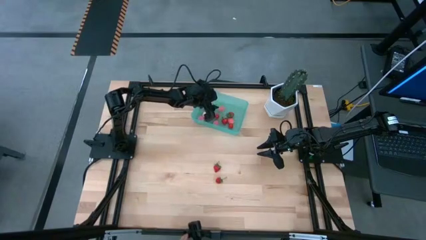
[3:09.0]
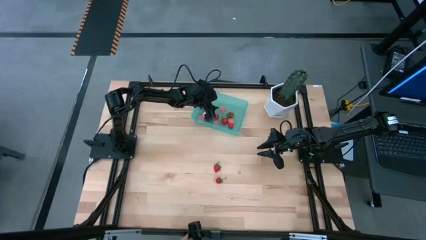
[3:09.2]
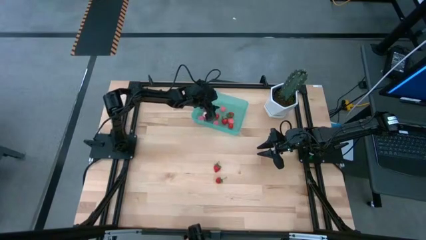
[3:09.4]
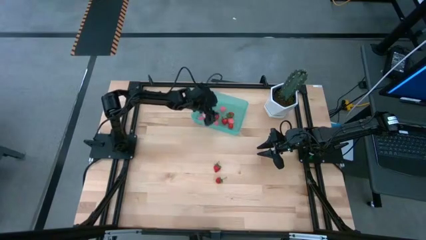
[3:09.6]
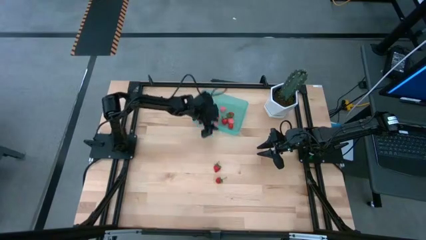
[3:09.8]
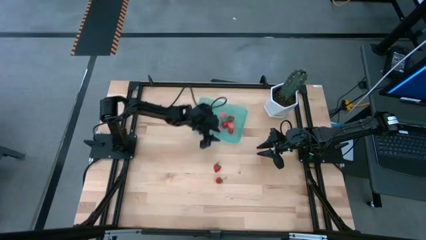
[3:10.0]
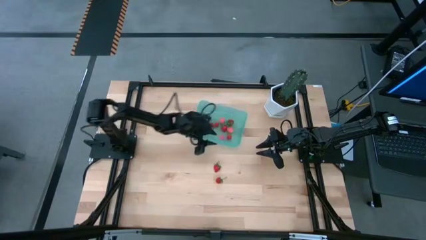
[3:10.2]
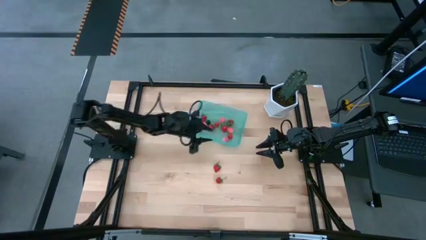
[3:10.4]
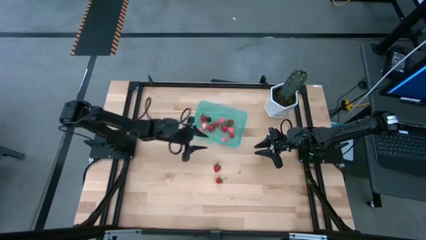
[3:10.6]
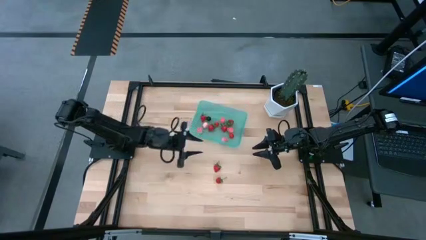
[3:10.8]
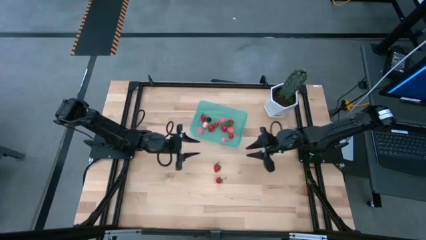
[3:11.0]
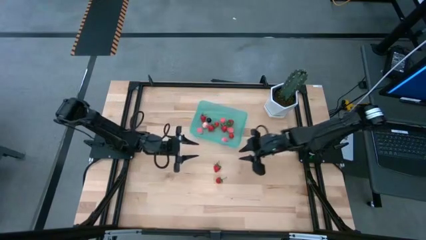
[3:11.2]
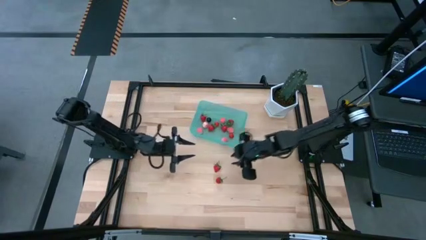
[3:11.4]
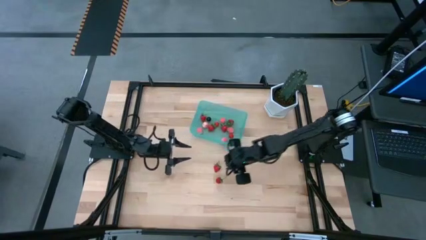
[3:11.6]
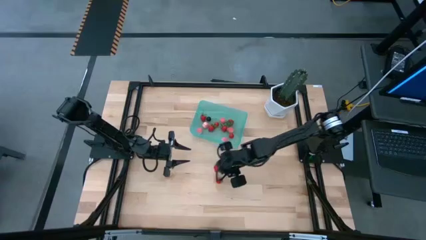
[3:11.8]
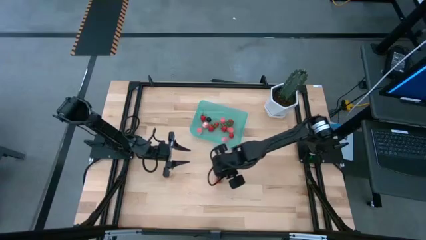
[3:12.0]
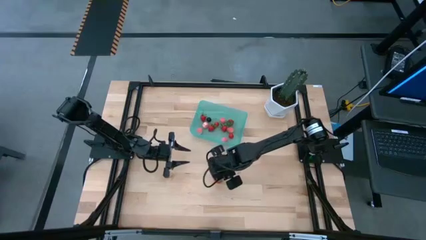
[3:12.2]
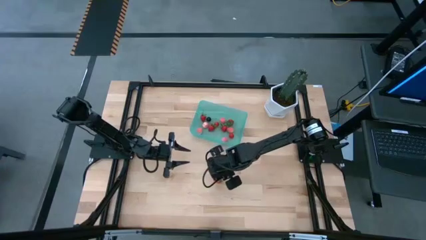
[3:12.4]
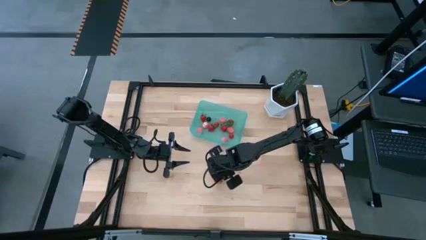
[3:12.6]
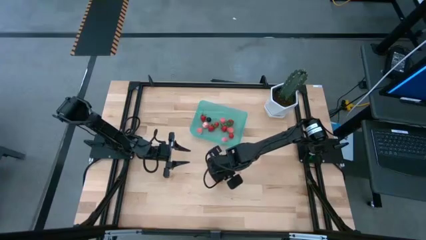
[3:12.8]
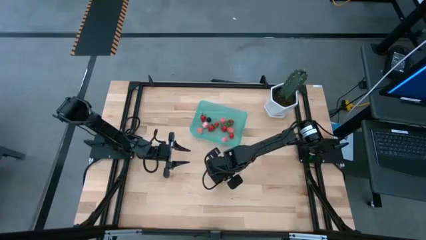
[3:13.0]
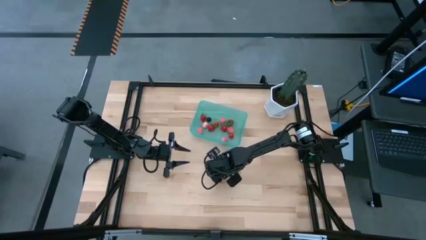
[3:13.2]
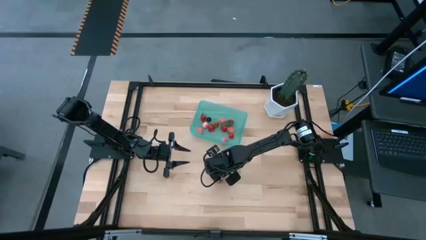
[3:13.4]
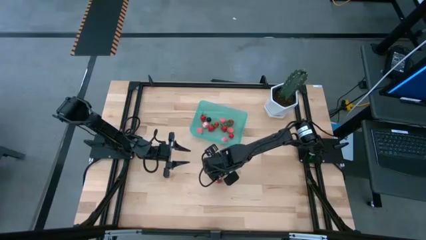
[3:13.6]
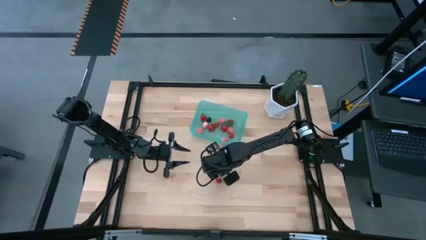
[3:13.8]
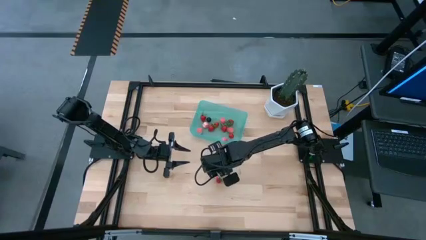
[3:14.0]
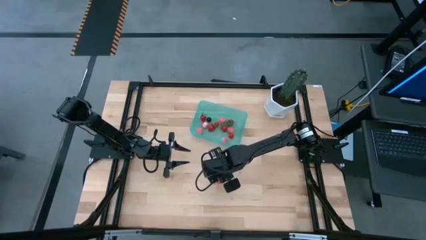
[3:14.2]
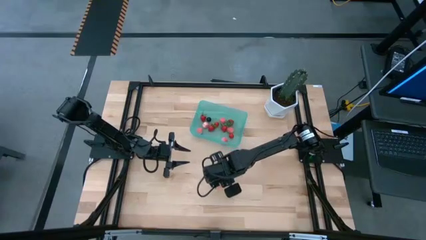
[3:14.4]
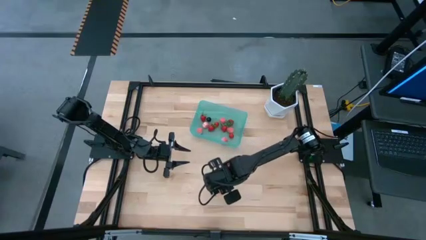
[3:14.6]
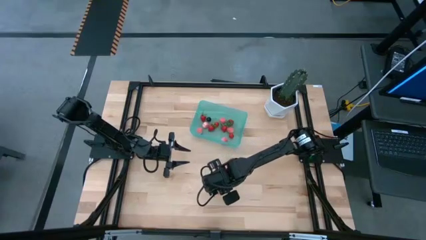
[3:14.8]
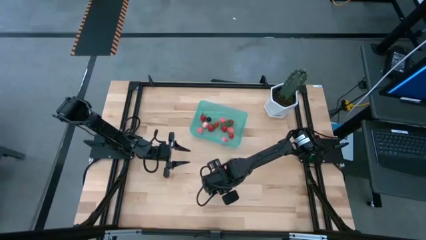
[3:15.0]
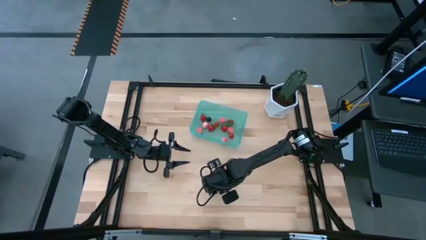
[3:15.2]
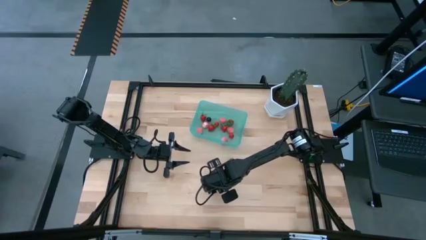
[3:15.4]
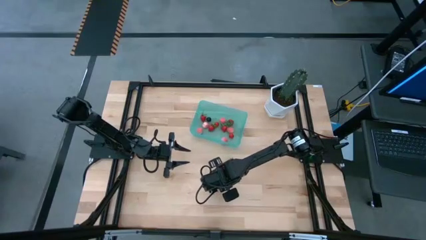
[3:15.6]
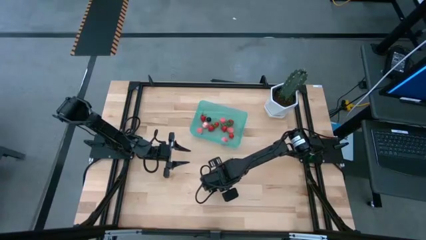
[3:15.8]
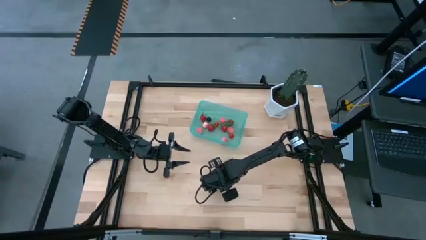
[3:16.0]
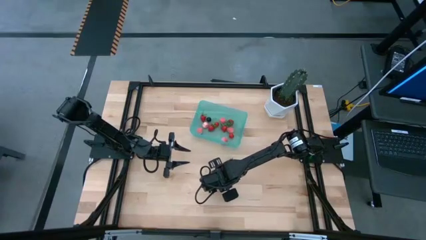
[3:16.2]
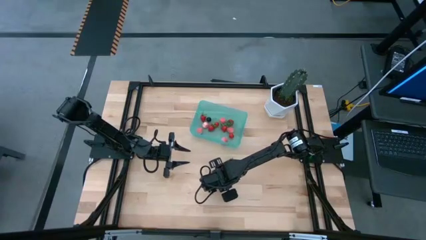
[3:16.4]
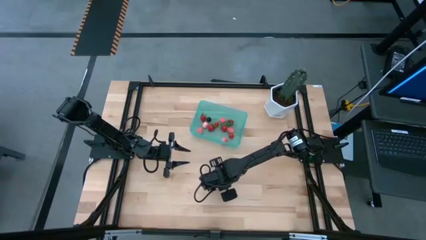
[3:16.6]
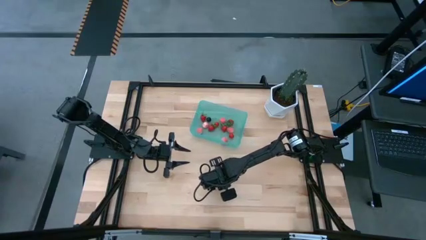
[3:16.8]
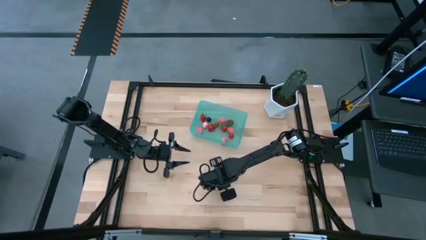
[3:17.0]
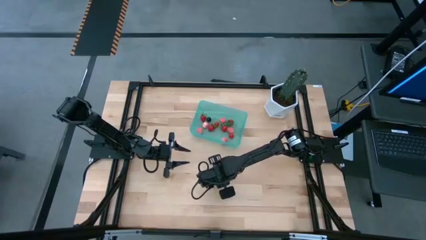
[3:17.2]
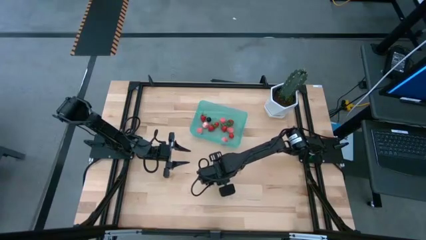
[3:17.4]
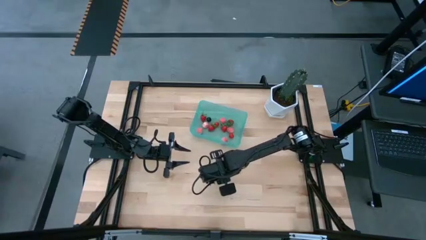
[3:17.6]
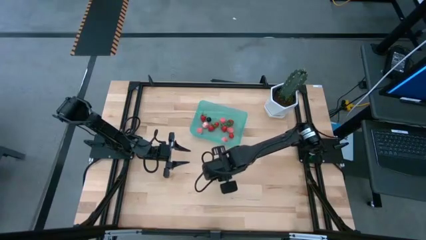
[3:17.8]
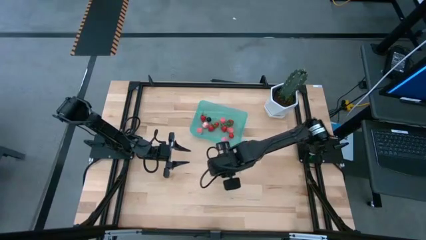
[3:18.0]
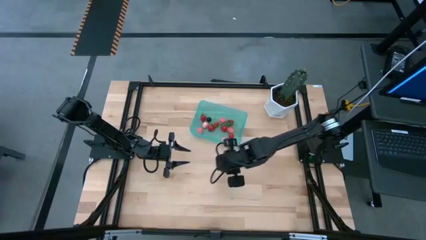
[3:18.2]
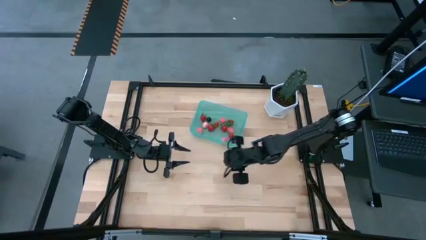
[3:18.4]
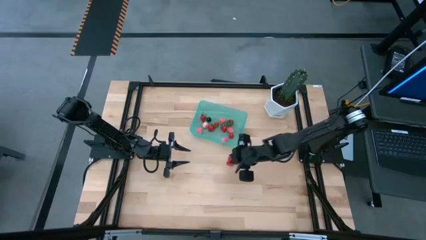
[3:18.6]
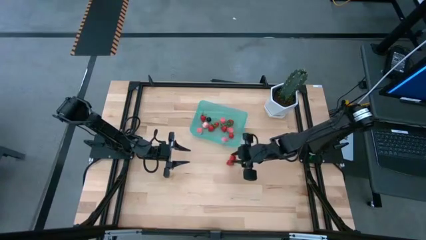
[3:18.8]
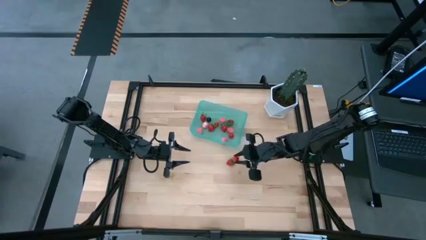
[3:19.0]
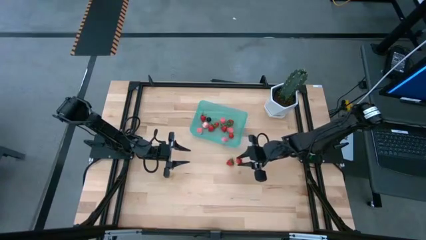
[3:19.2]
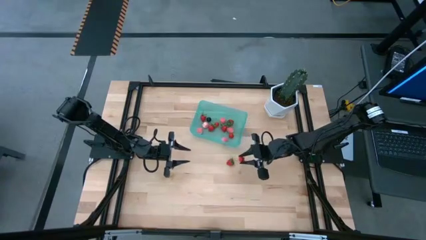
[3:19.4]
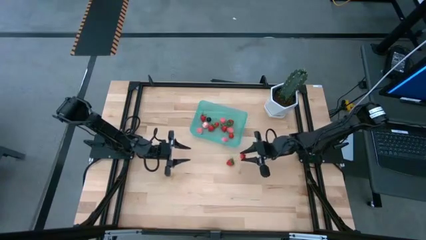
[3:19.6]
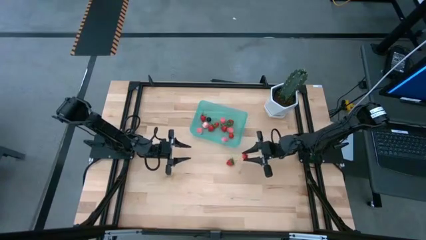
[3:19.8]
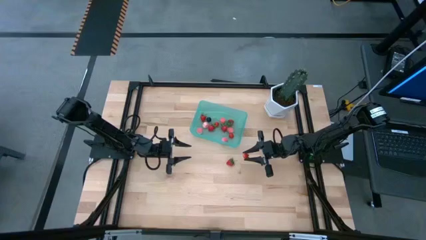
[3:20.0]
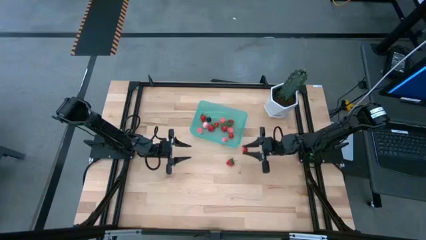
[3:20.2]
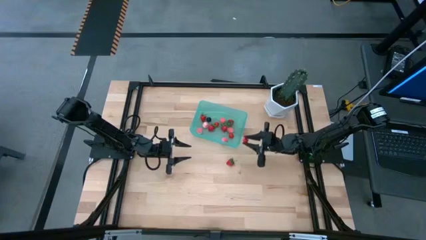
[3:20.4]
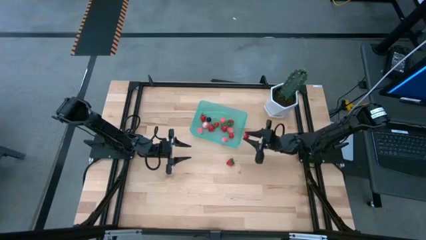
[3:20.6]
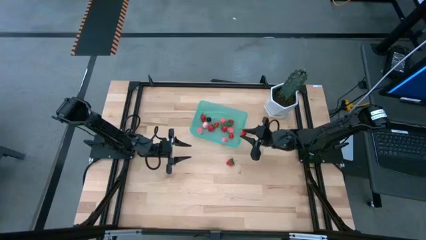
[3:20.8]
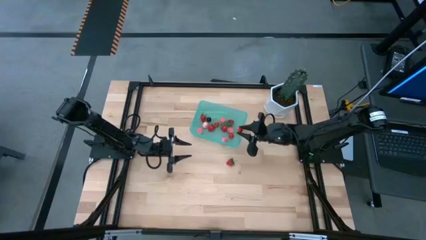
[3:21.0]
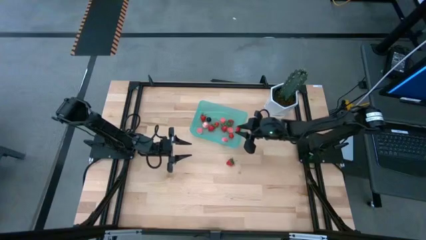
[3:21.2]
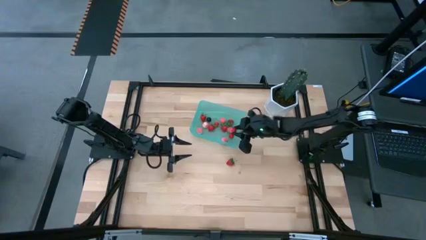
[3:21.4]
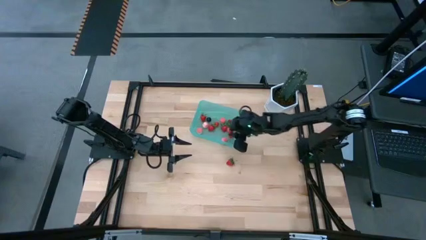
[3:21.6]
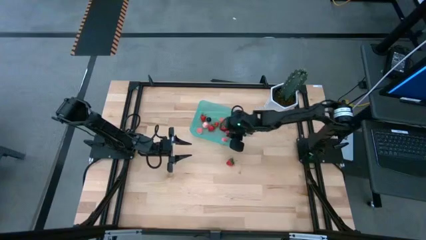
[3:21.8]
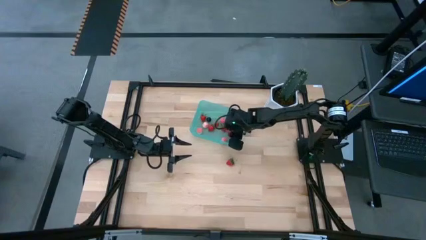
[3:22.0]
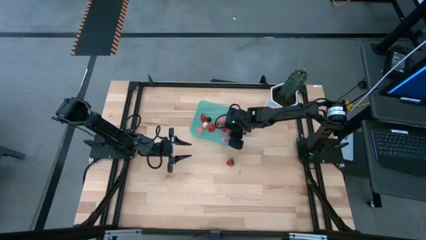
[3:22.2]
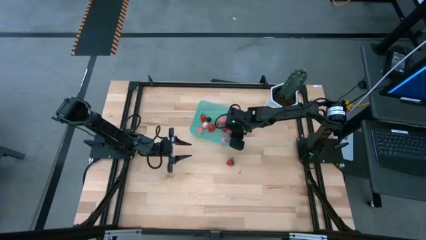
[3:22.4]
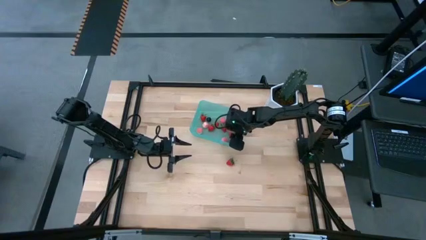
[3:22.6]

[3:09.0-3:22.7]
Task: Pick and placing Produce into tupperware
Put the red strawberry into the light blue bin
